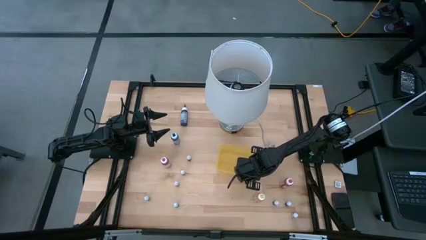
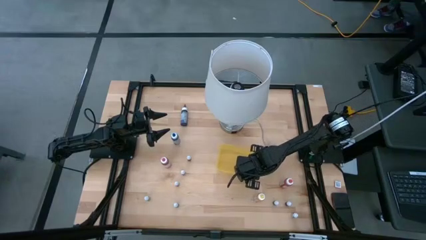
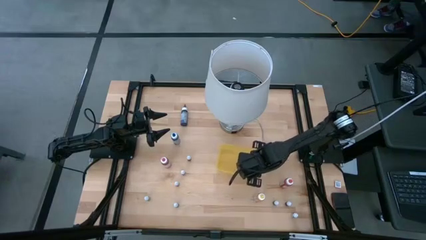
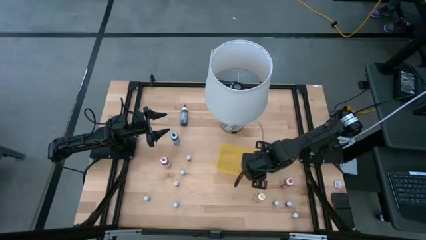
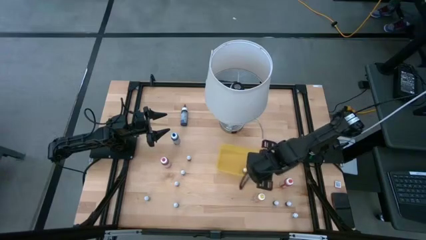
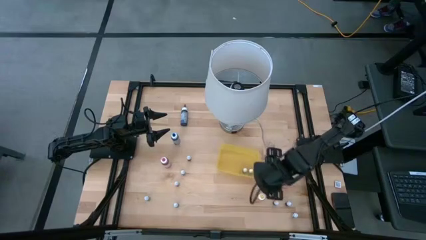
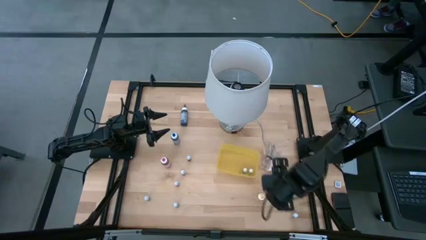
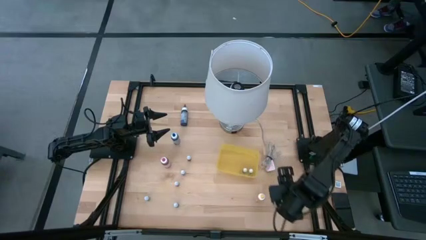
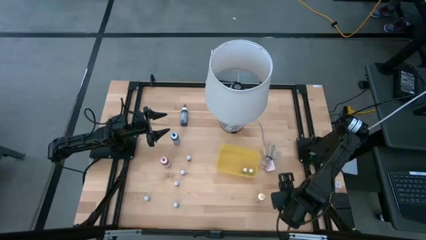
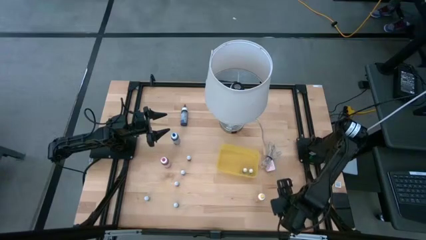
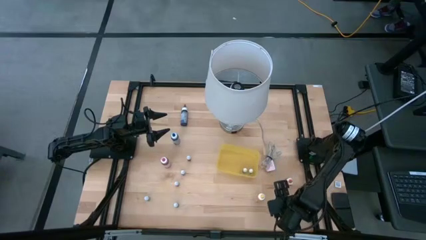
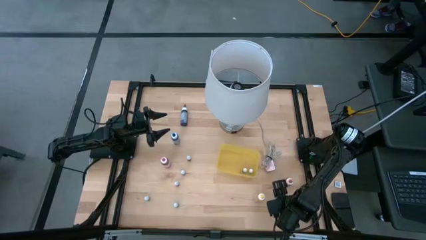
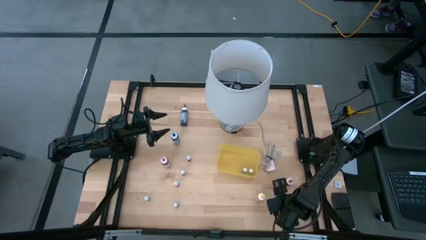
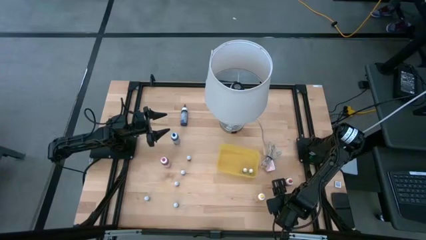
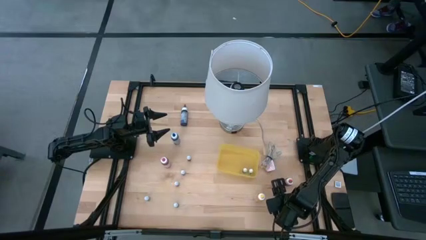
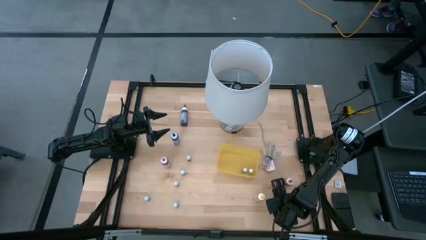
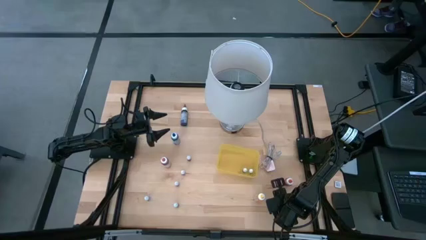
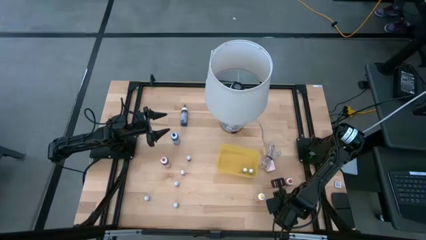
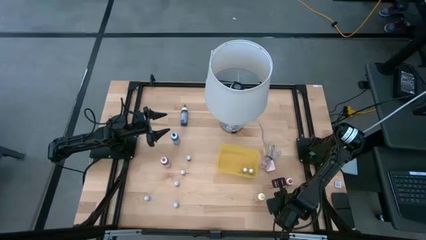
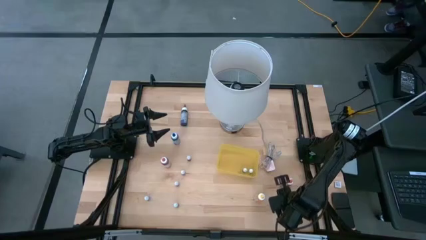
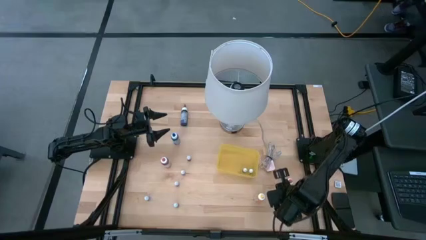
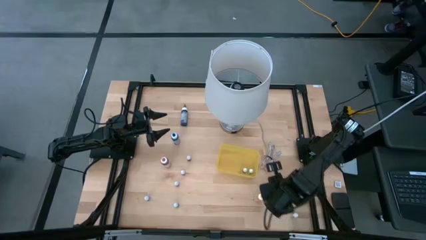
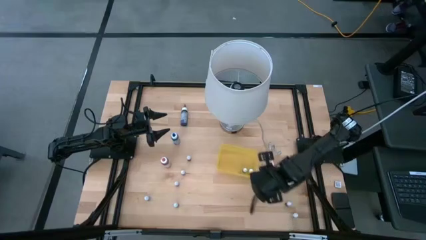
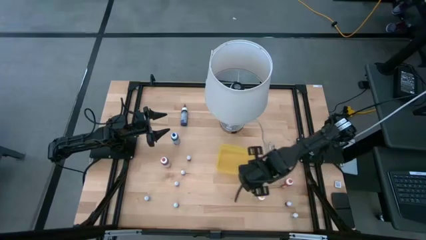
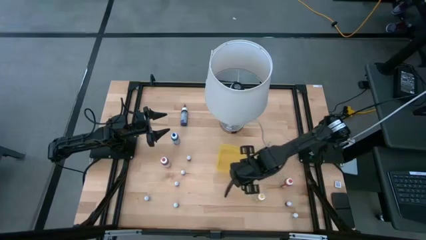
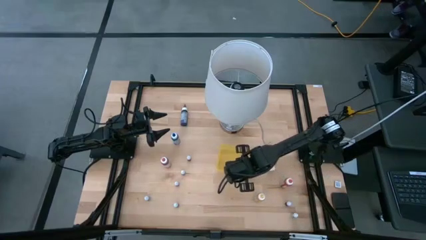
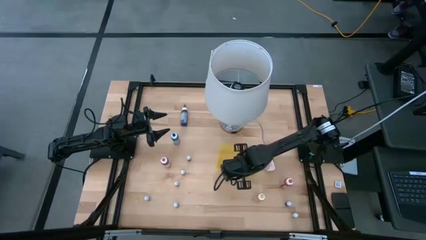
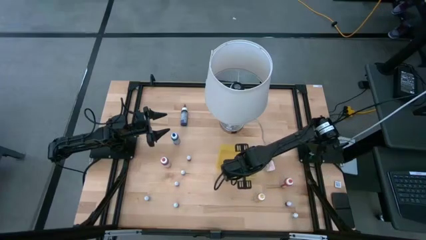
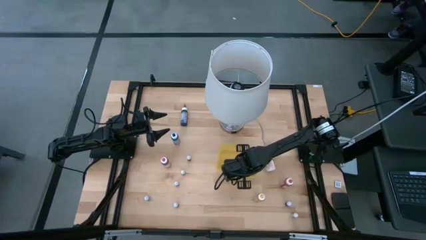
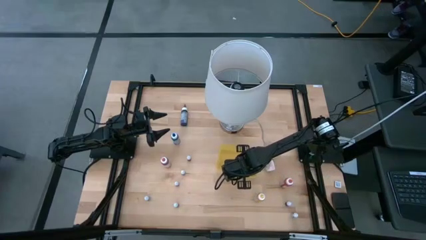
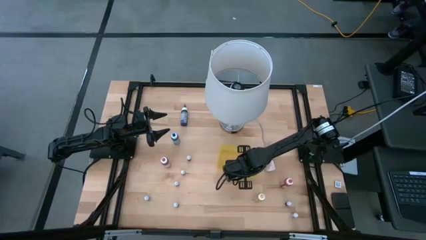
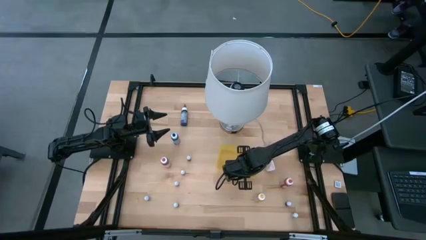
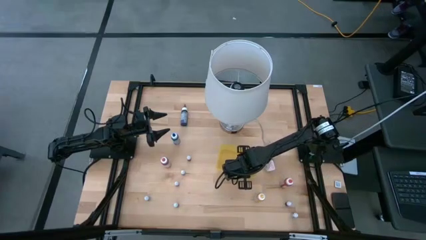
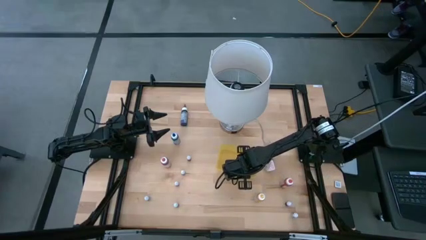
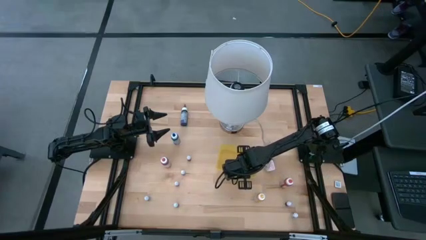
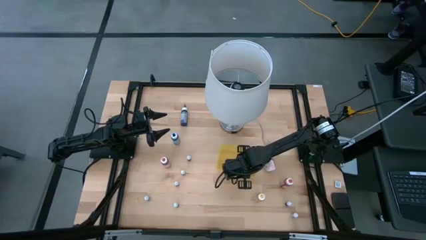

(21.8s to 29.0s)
Task: Pick & Place food coloring
Put the purple food coloring bottle into the yellow bin

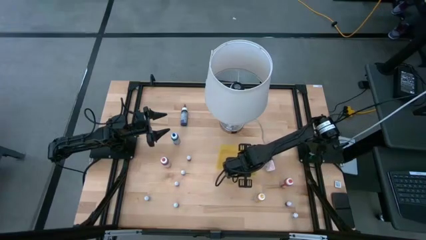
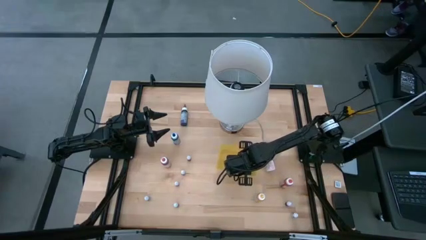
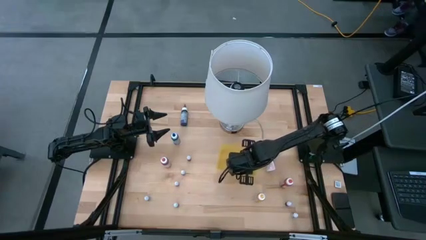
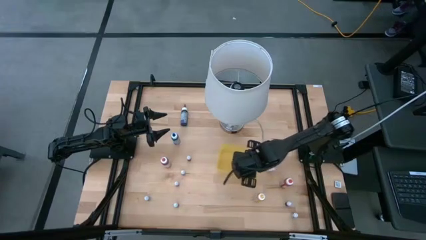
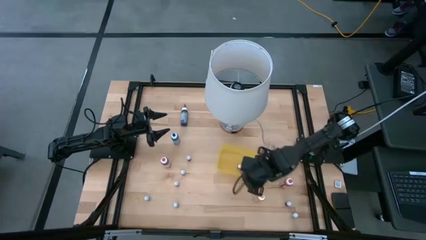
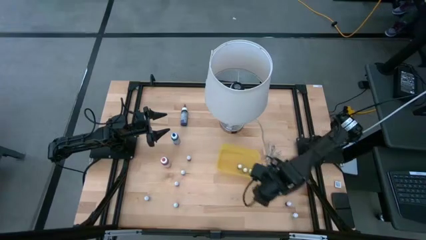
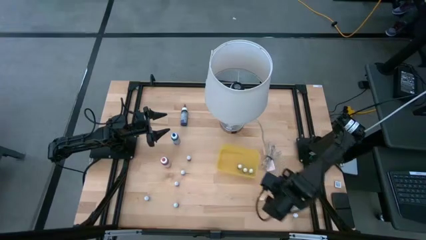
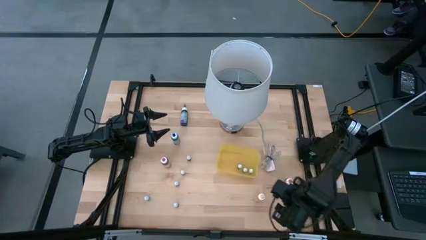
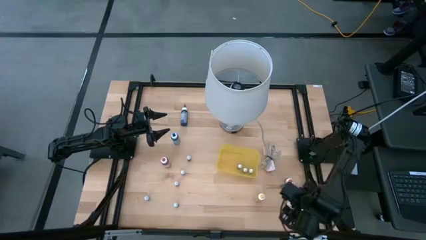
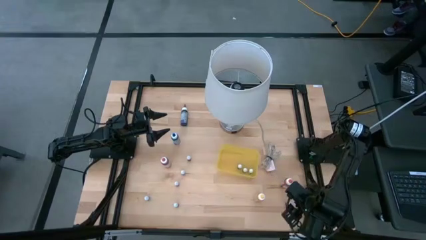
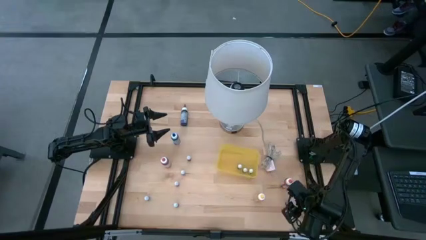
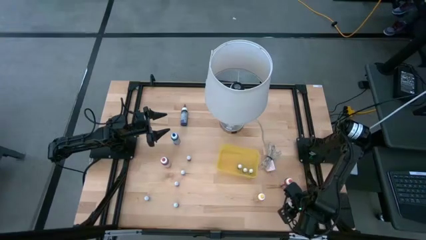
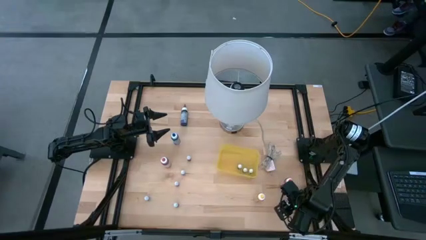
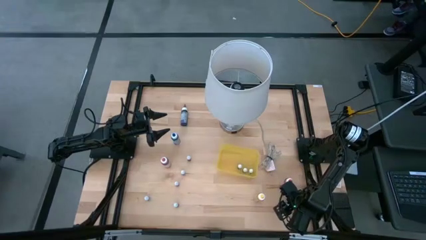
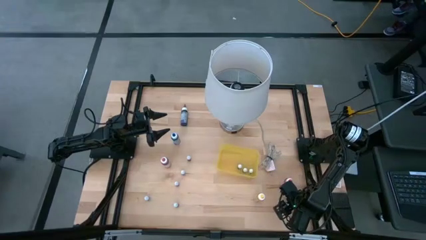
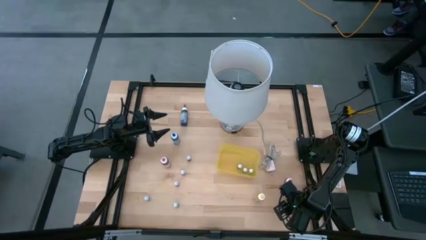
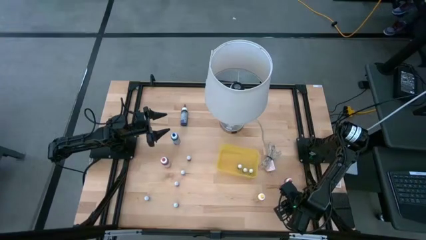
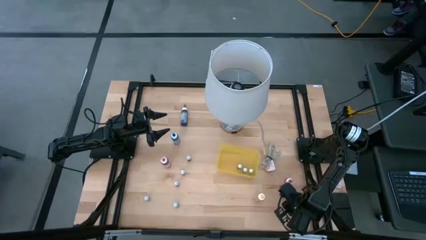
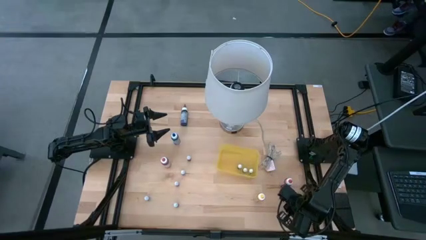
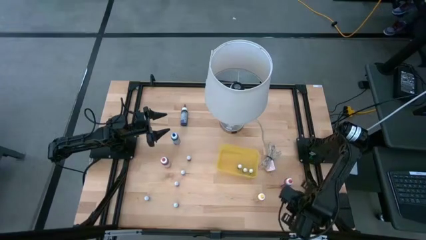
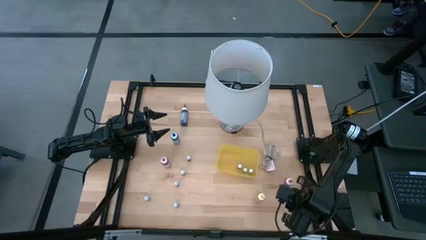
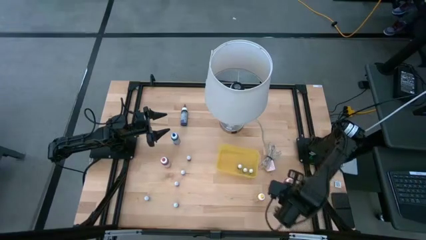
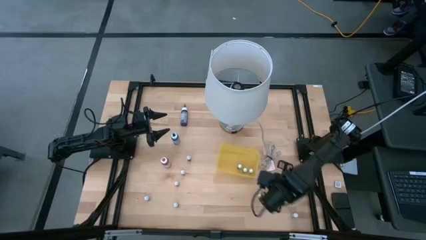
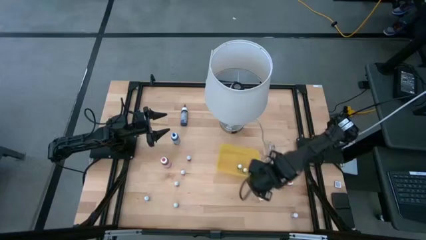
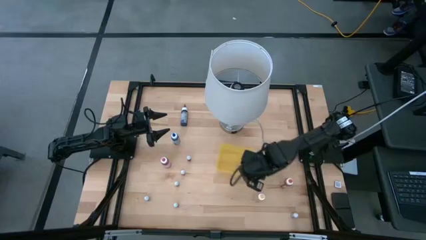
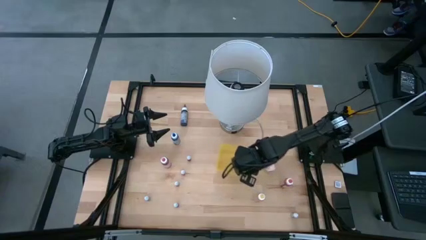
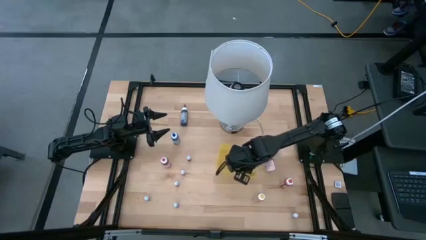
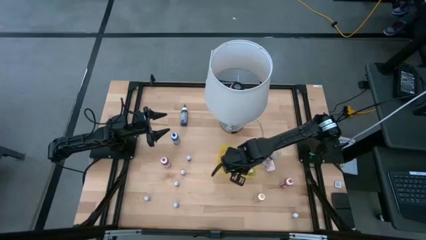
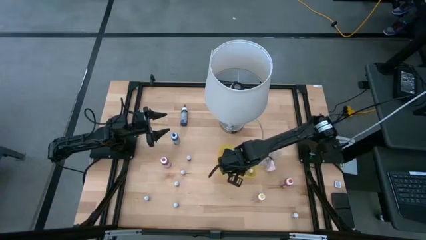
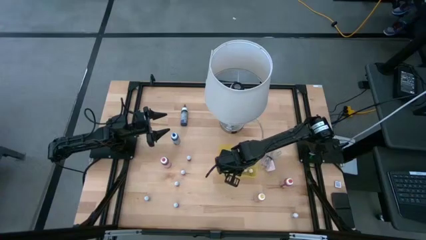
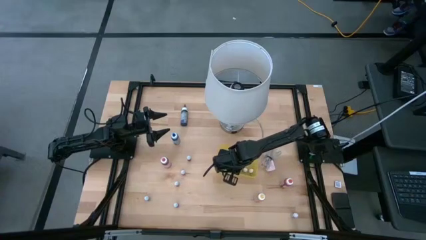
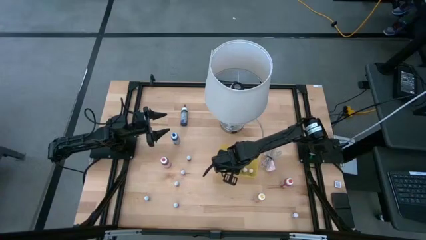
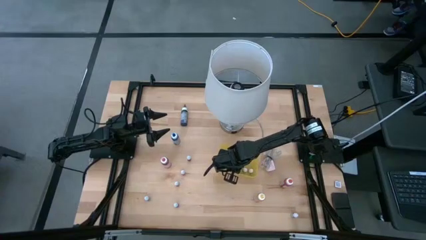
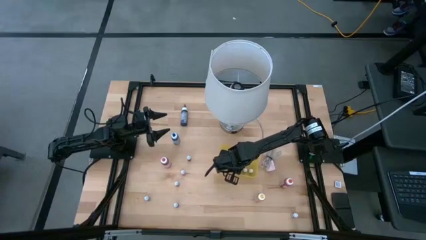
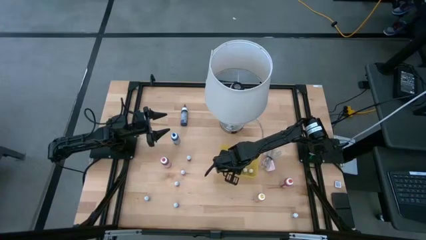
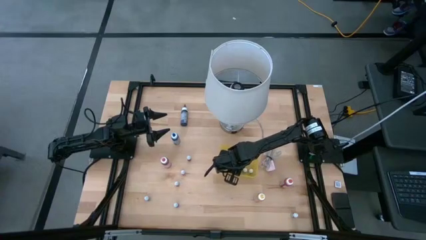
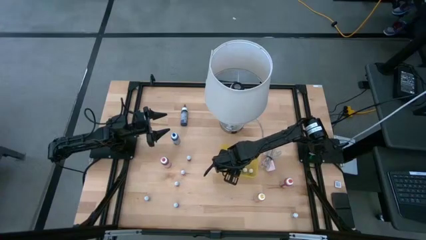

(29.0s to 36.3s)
Put the black food coloring bottle into the yellow bin

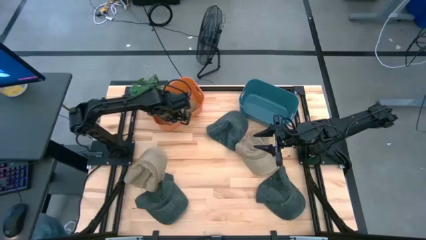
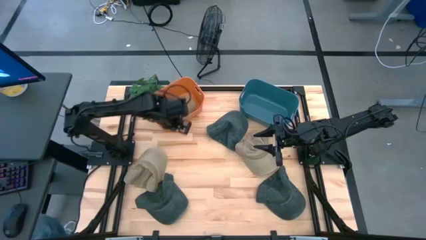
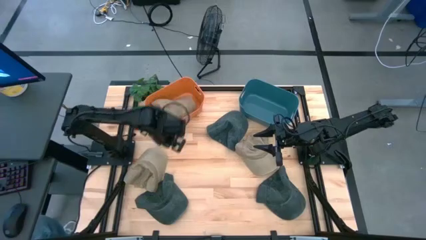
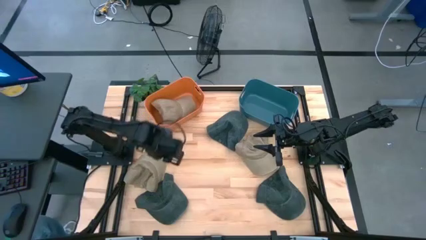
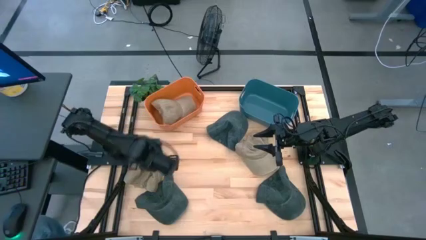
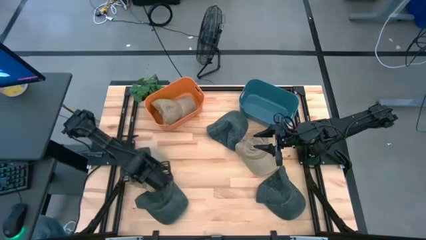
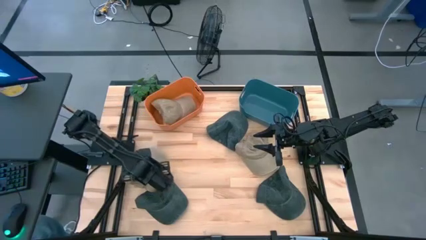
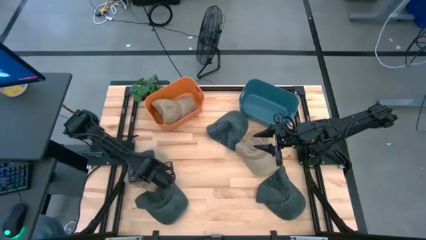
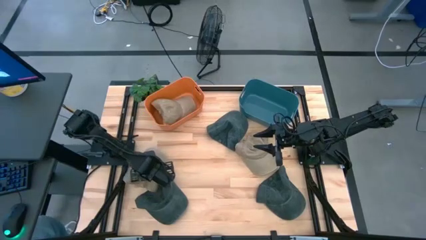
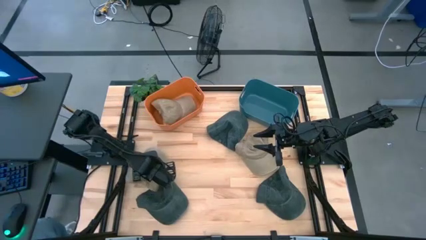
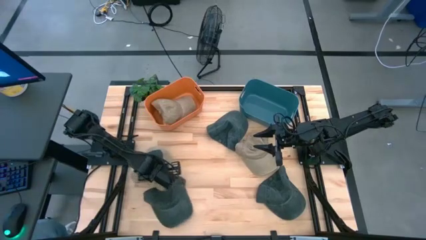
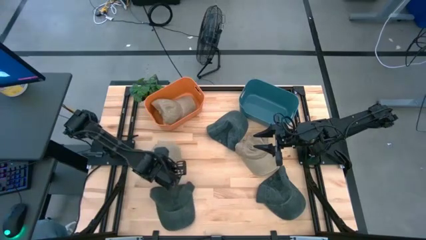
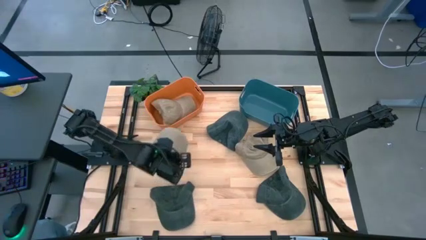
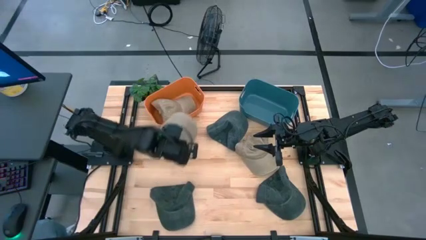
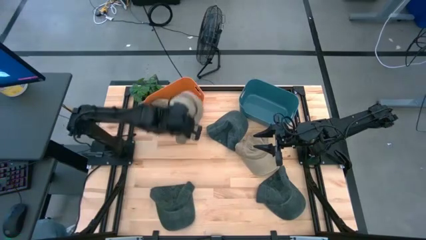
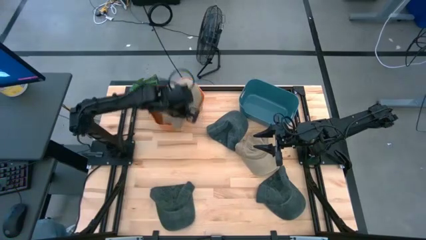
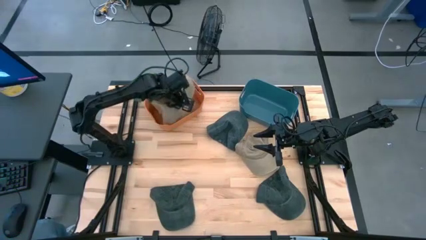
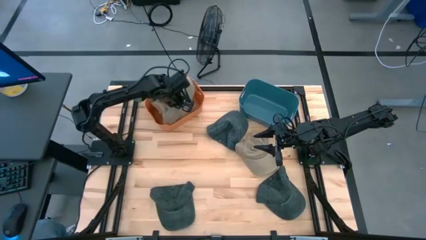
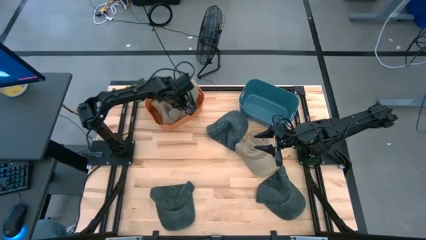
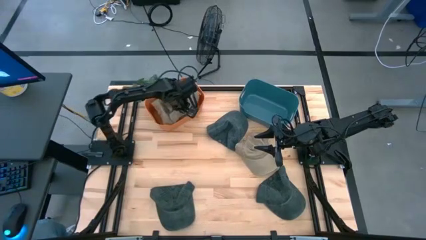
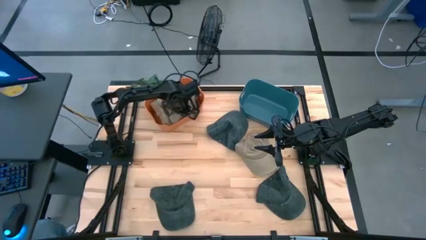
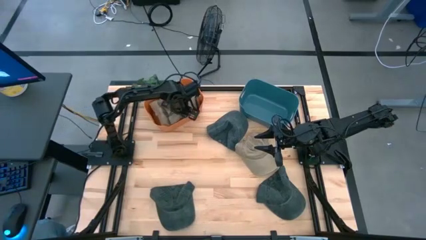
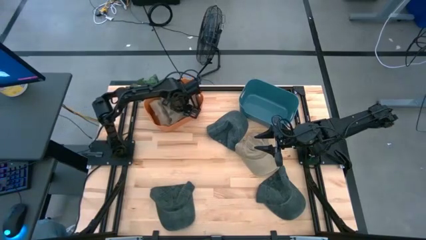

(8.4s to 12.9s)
Task: Pick & Place hat
Put the left brown cap into the orange bin
